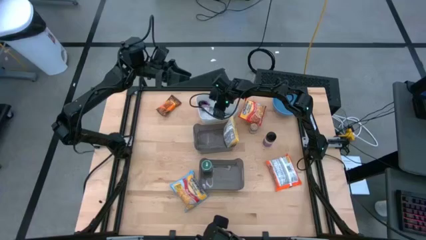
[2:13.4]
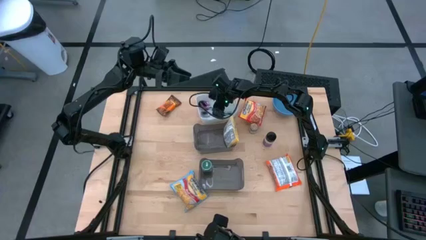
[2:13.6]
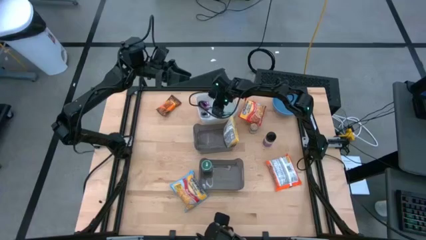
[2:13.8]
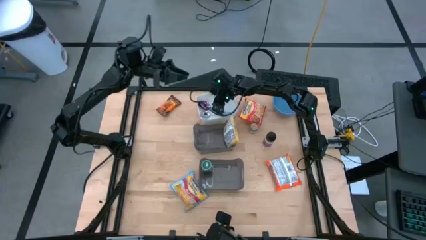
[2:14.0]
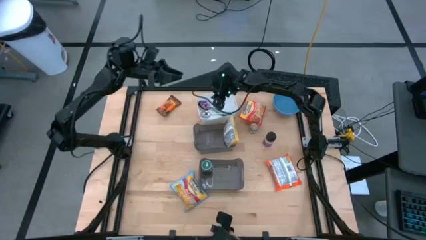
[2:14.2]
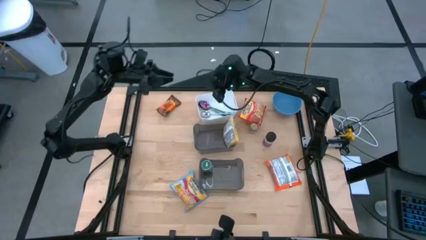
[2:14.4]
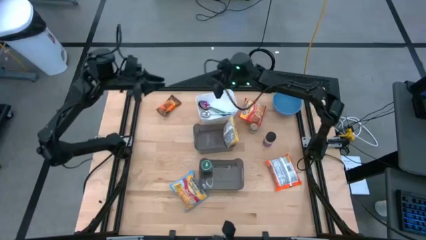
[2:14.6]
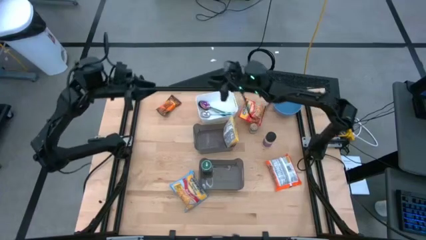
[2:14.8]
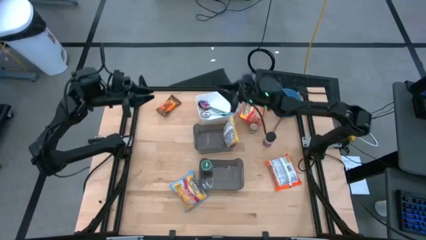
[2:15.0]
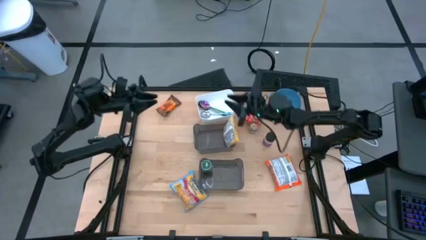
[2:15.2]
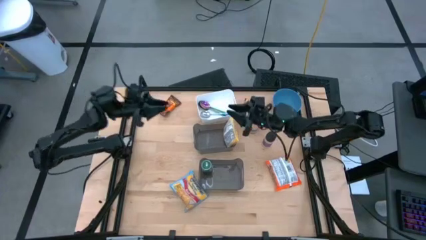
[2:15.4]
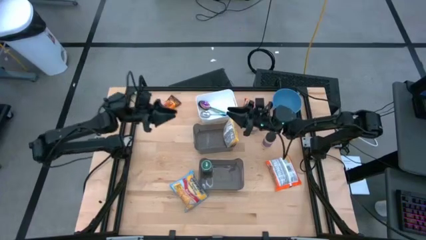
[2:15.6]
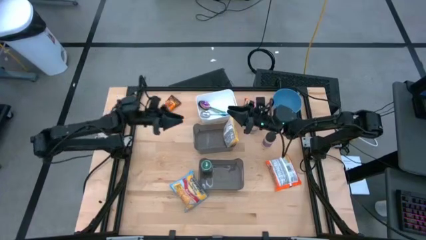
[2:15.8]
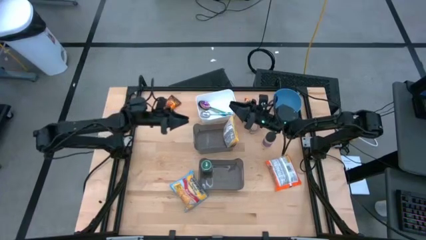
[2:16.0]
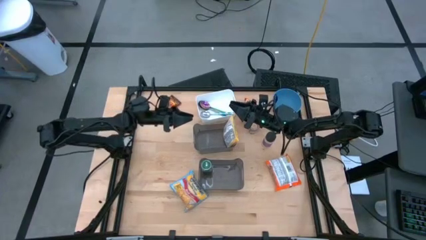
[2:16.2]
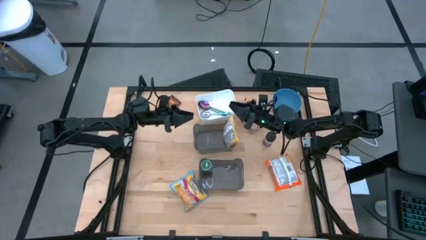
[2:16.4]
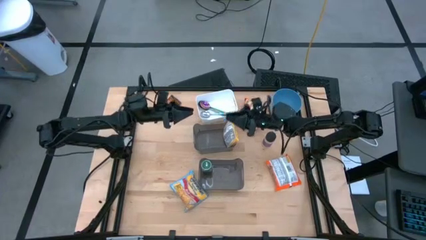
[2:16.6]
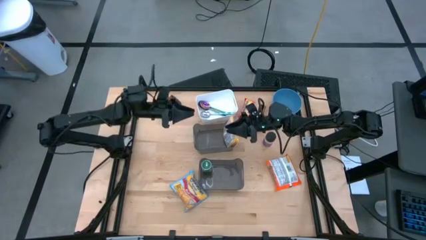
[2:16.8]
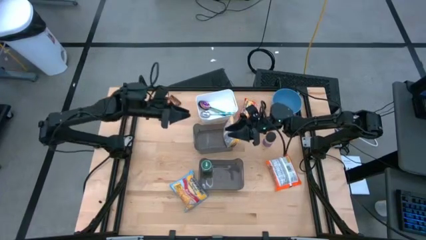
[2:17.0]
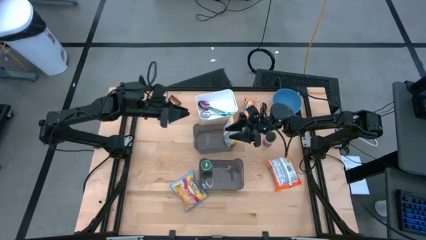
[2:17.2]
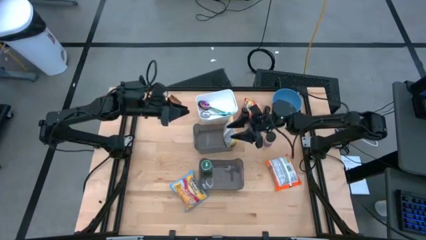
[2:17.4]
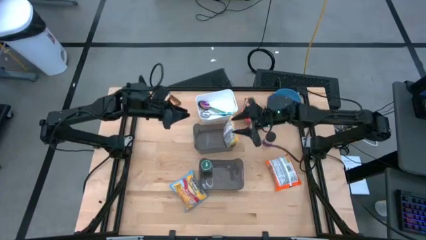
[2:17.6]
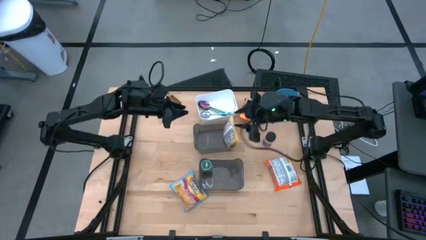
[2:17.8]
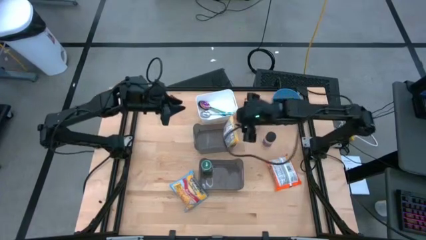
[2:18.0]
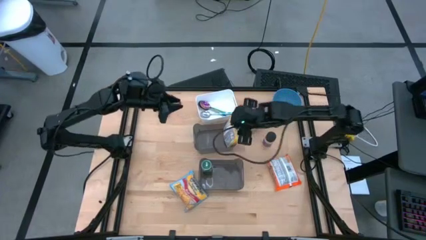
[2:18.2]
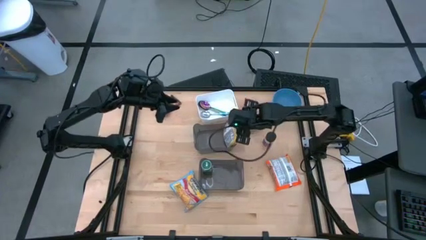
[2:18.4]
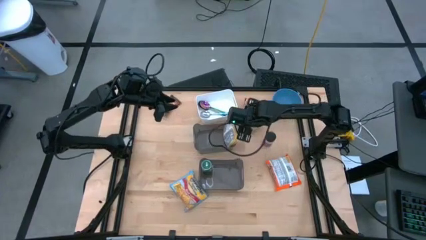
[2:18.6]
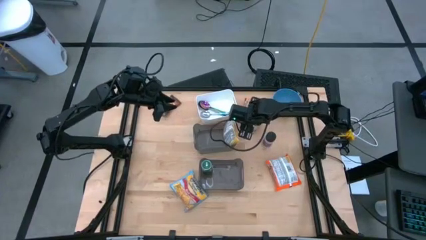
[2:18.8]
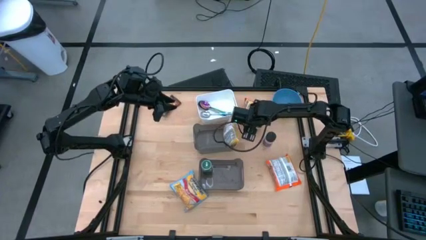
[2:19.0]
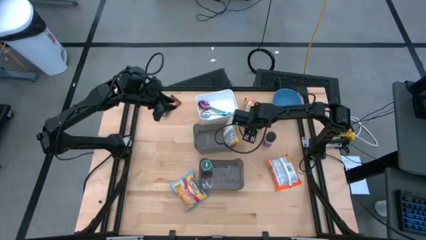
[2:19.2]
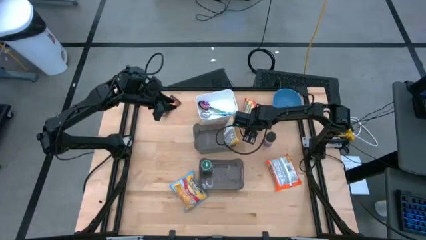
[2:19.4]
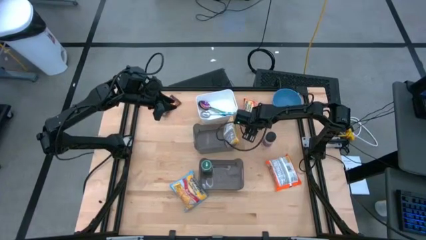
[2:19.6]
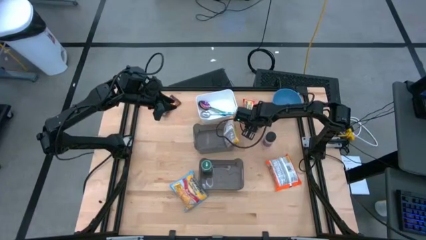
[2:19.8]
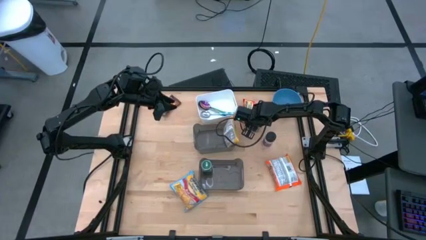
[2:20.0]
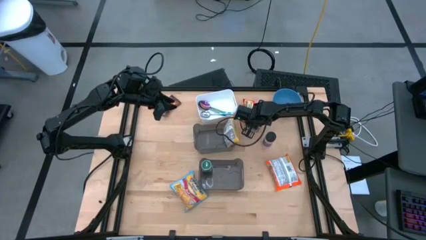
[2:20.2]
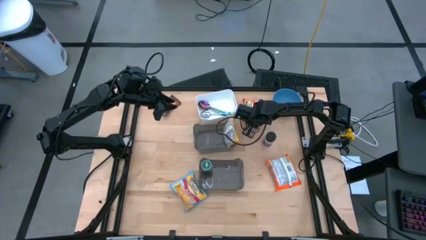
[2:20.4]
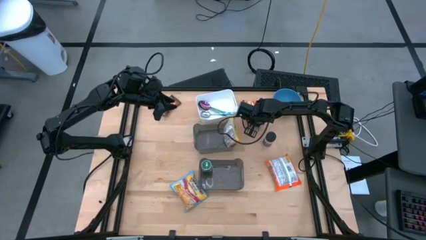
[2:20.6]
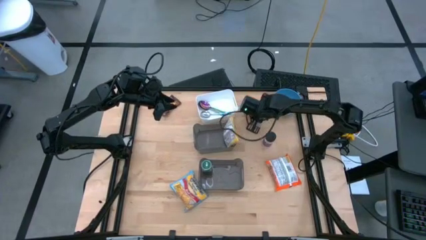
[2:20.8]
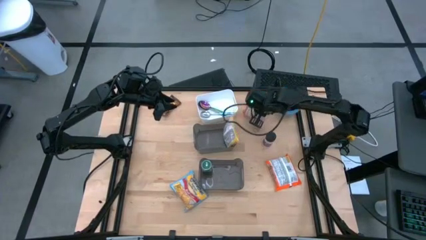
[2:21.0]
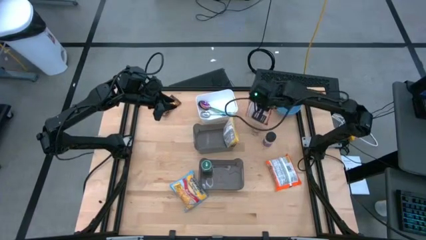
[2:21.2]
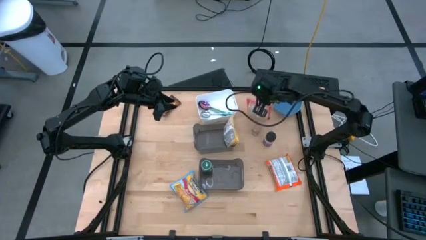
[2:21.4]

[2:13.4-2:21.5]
Task: Pick & Place Food Item
Put the red noodle pack into the top black bin

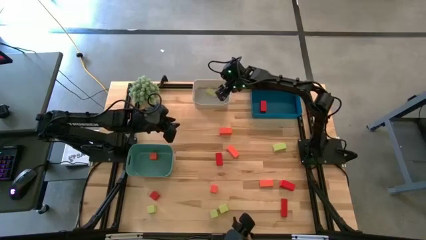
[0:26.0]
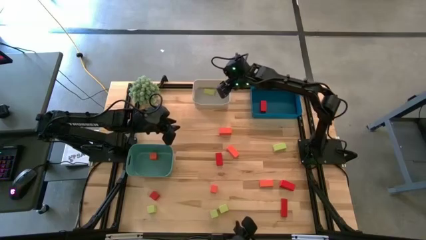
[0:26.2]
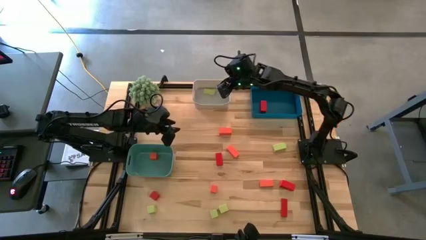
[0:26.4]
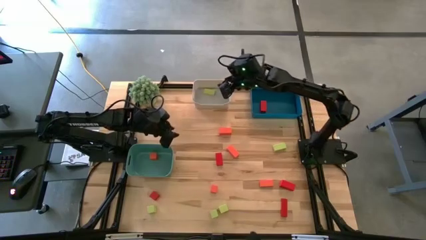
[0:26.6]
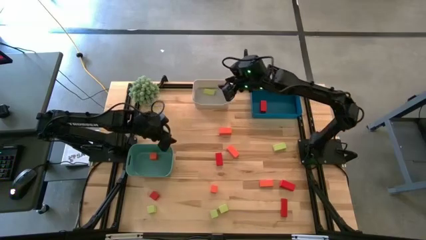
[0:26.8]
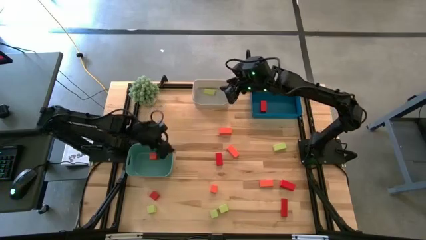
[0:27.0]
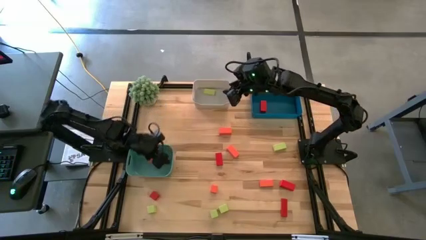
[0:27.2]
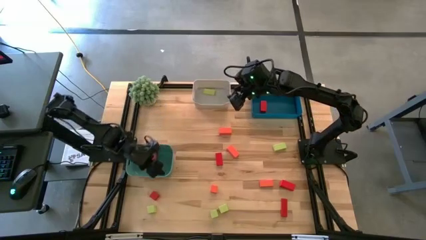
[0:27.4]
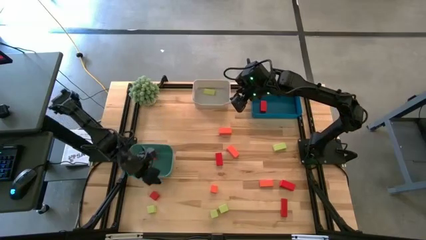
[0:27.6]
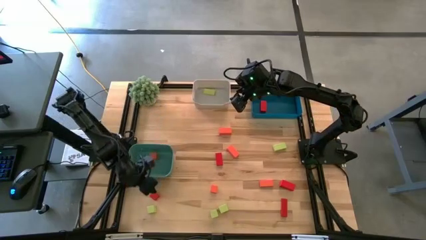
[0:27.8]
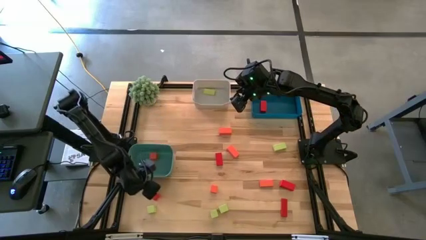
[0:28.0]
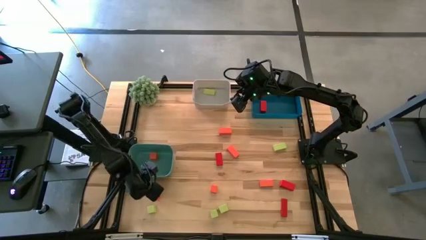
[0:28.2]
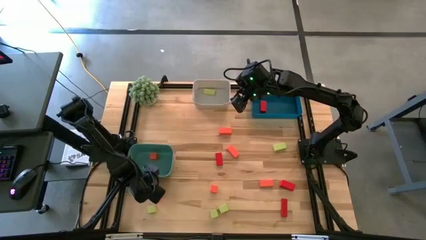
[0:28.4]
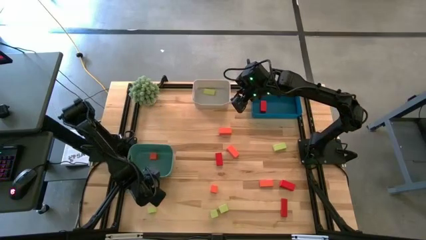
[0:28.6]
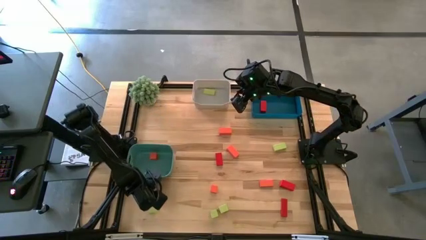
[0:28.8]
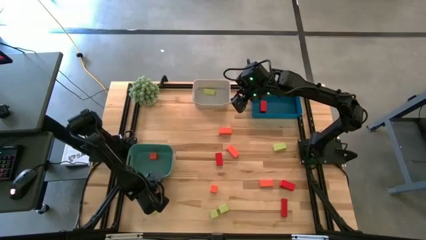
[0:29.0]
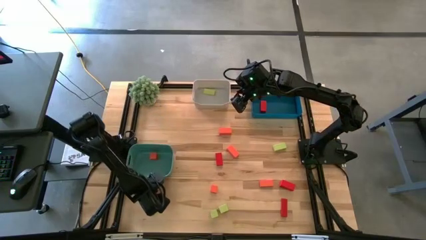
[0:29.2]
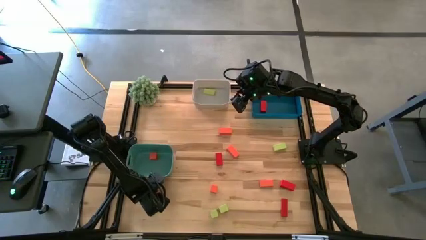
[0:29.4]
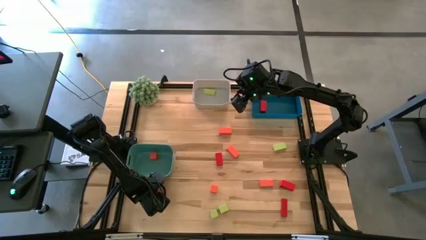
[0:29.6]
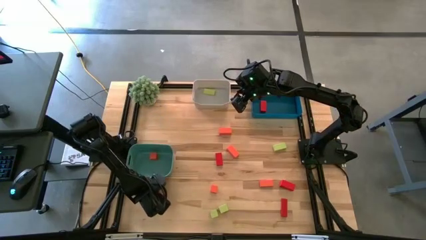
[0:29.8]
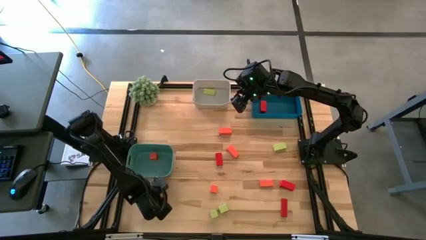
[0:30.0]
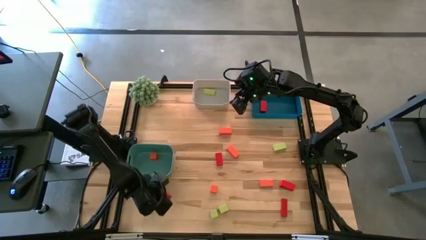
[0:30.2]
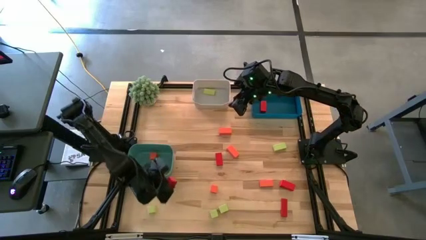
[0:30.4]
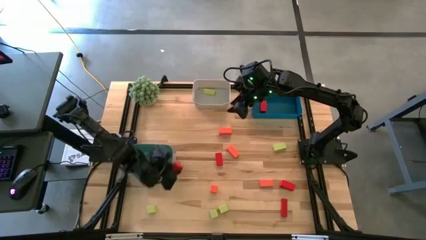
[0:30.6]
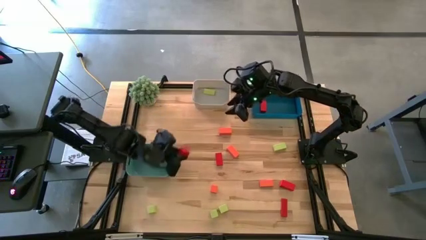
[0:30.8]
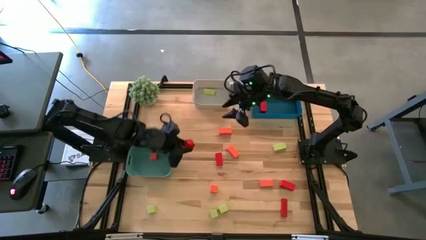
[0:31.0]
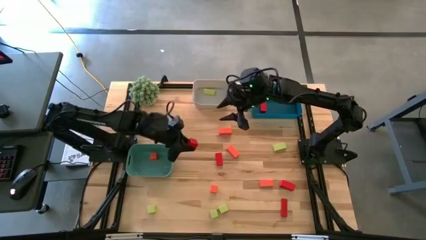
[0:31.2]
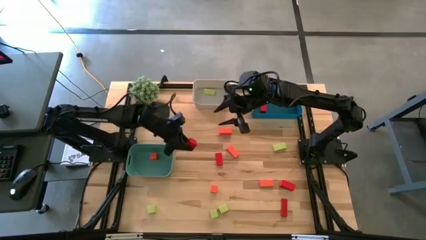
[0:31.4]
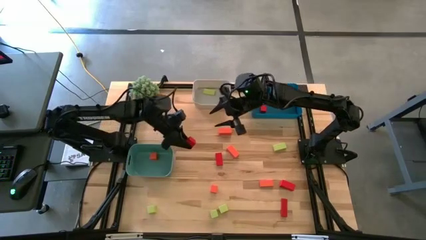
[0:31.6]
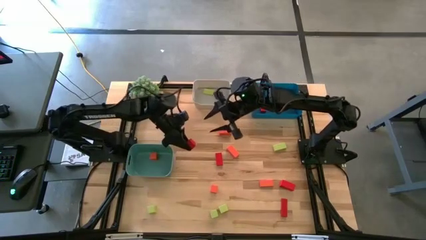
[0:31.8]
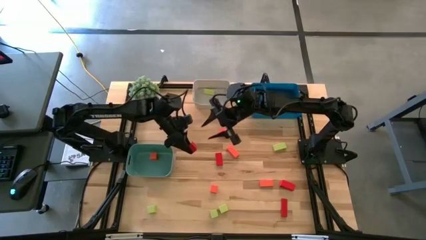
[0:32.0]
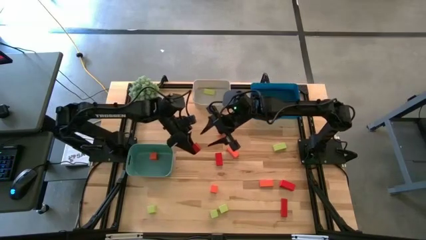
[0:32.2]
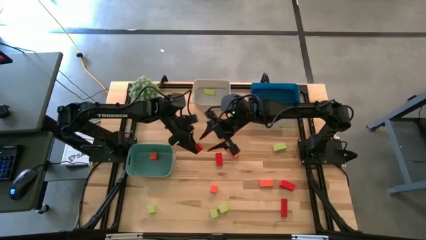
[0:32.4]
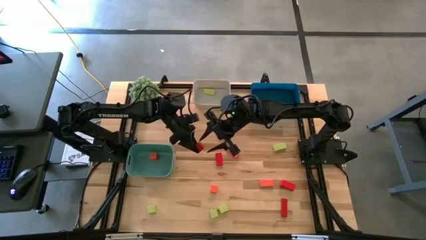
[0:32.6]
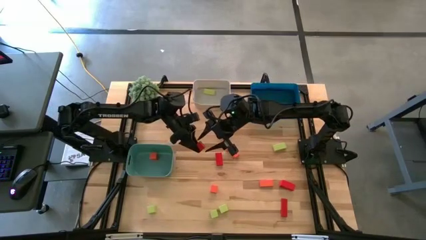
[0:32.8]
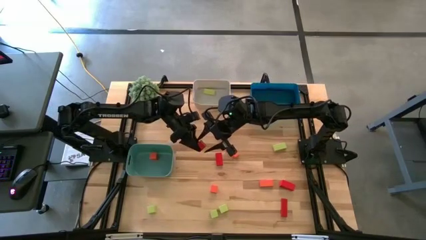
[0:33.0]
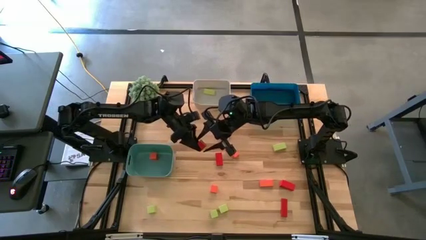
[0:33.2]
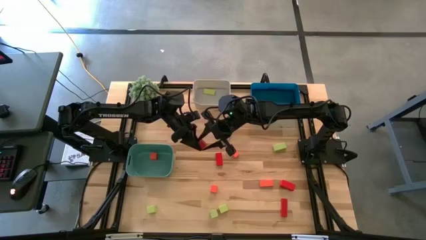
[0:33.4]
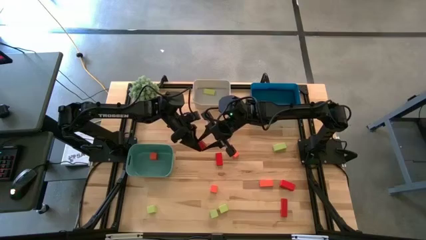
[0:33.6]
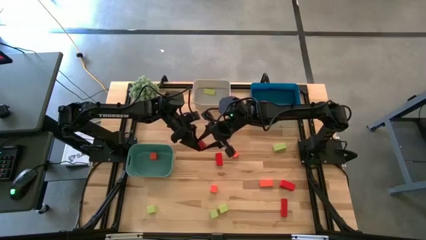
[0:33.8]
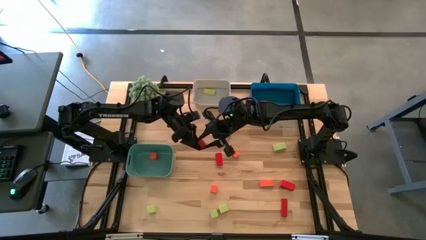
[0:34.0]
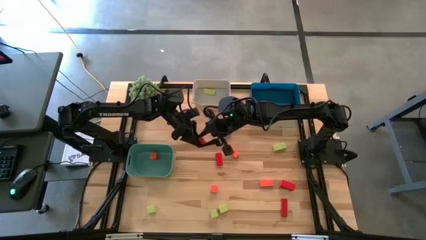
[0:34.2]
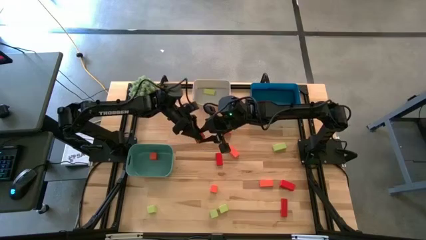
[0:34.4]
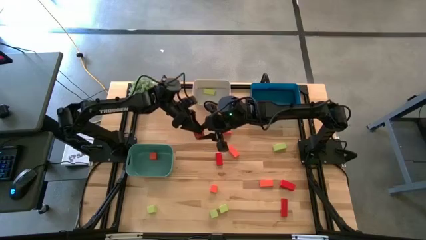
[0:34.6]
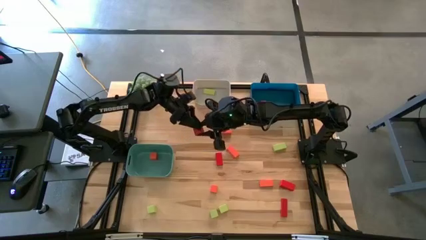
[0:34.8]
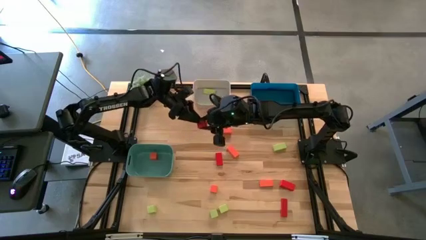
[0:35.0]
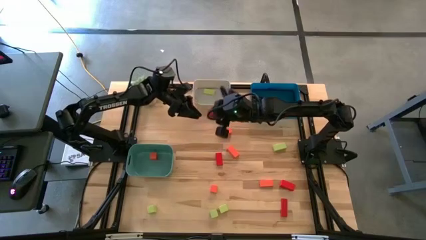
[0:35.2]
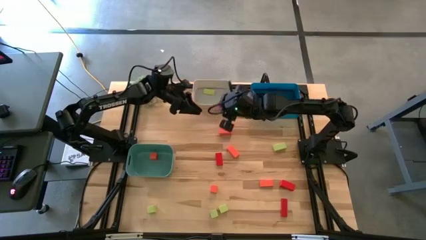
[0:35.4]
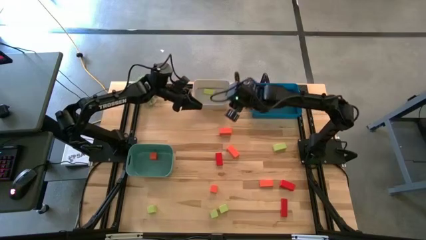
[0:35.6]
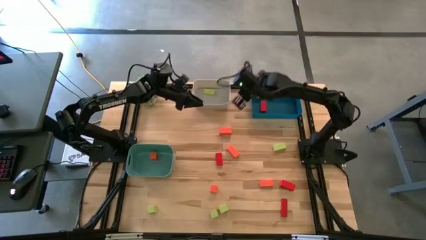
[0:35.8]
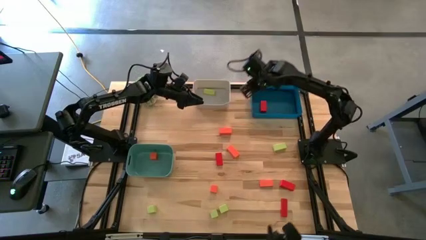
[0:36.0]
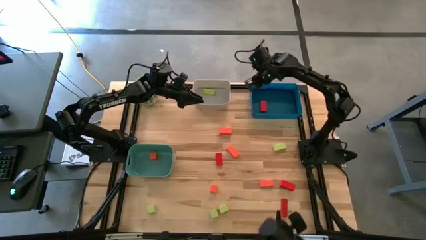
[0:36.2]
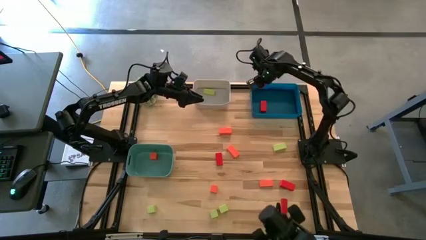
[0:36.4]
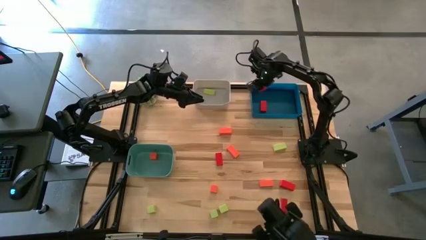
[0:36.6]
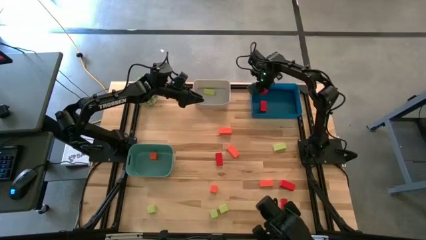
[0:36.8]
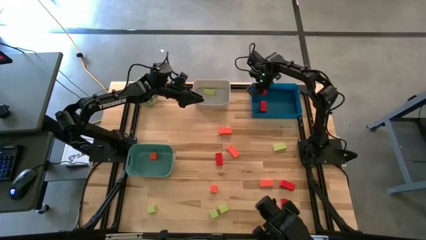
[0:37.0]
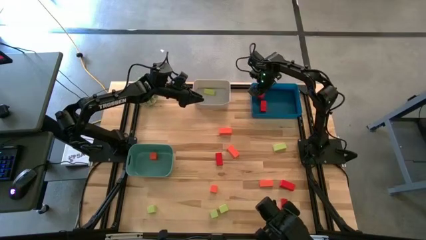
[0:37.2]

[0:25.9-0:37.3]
Task: Sort & place blocks by color
Put the red block into the blue bin
